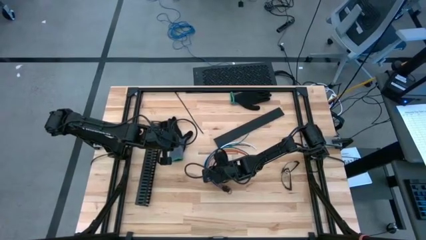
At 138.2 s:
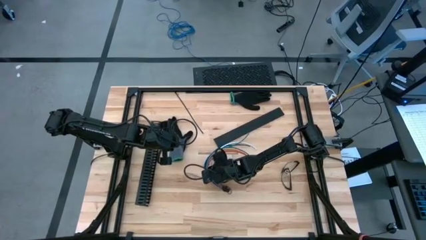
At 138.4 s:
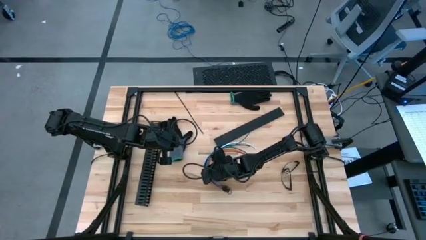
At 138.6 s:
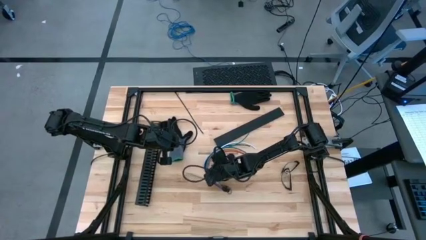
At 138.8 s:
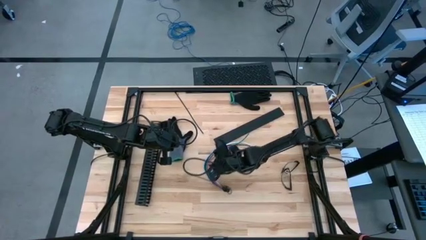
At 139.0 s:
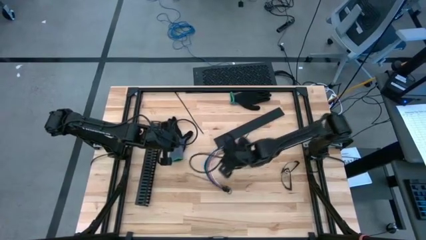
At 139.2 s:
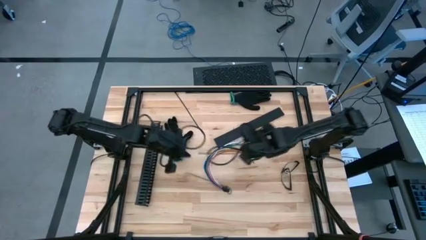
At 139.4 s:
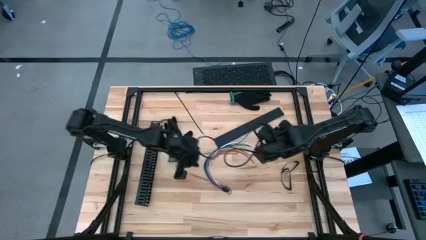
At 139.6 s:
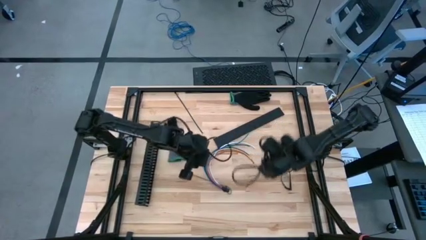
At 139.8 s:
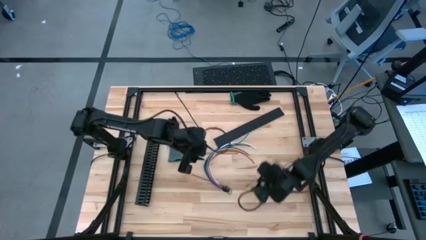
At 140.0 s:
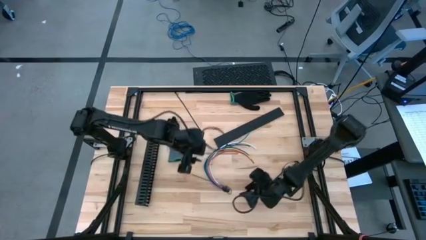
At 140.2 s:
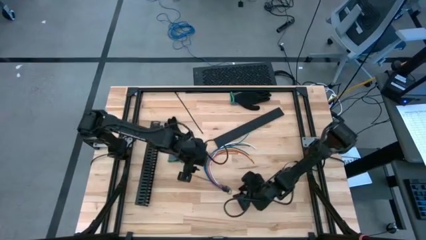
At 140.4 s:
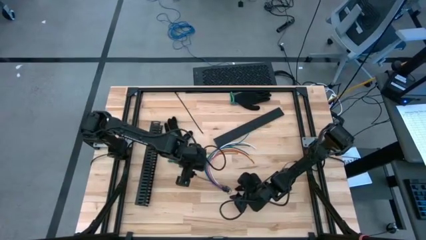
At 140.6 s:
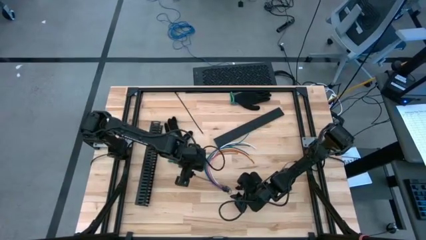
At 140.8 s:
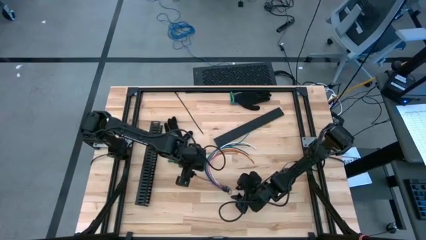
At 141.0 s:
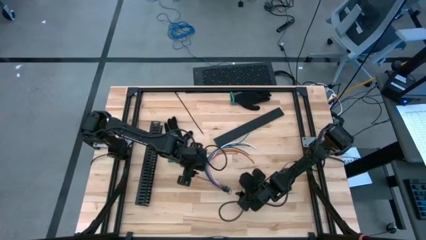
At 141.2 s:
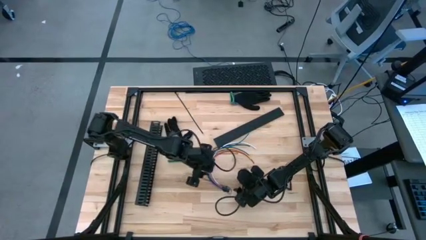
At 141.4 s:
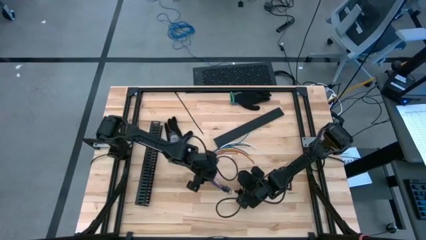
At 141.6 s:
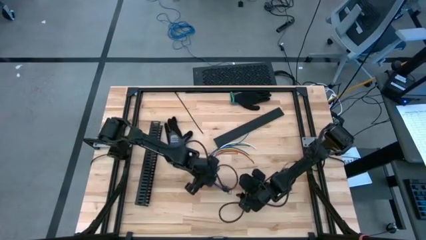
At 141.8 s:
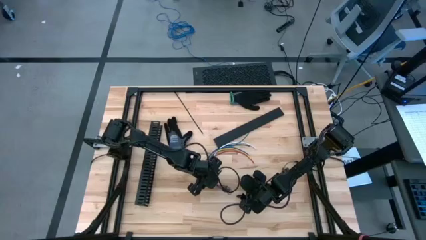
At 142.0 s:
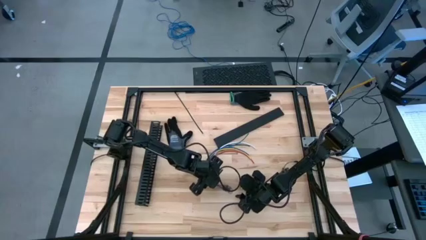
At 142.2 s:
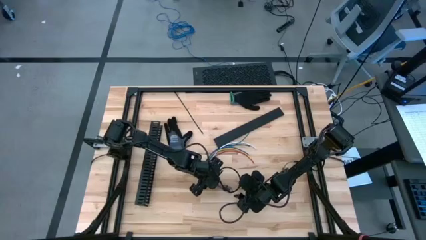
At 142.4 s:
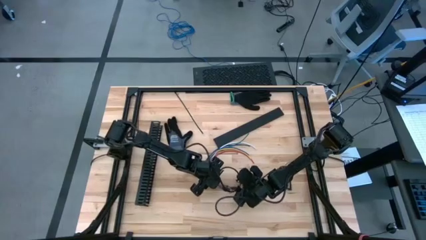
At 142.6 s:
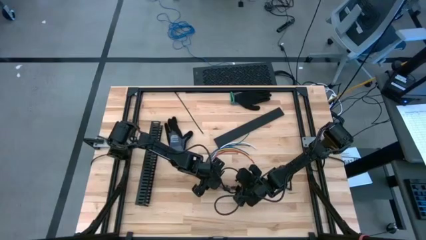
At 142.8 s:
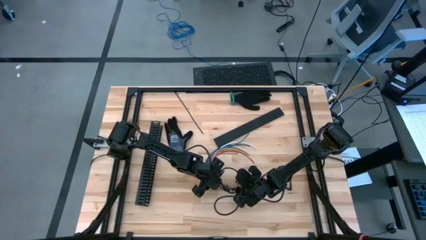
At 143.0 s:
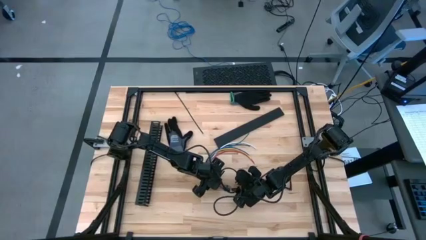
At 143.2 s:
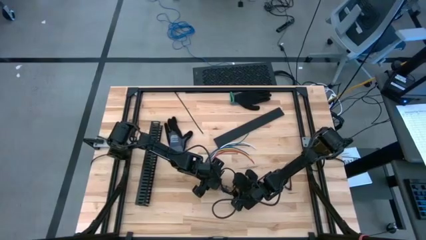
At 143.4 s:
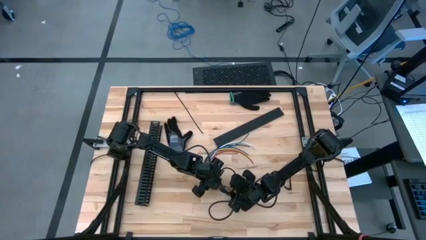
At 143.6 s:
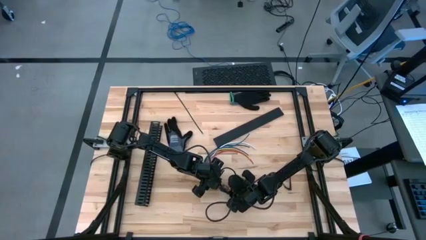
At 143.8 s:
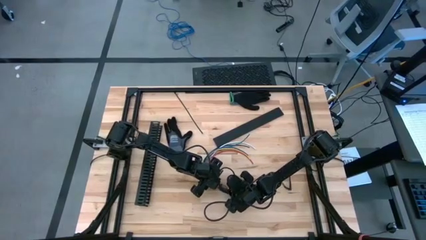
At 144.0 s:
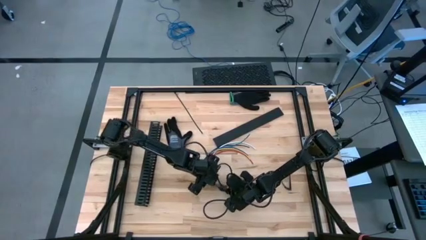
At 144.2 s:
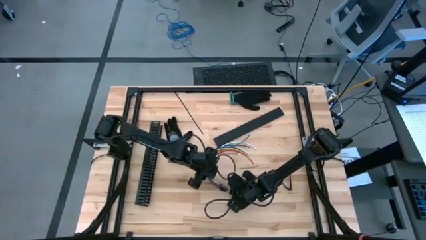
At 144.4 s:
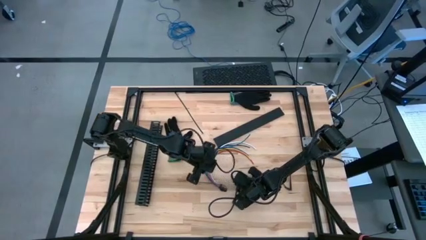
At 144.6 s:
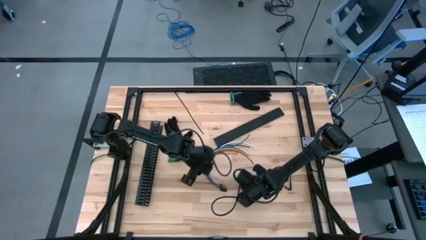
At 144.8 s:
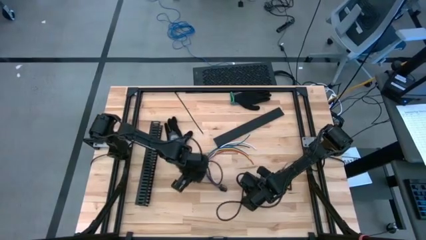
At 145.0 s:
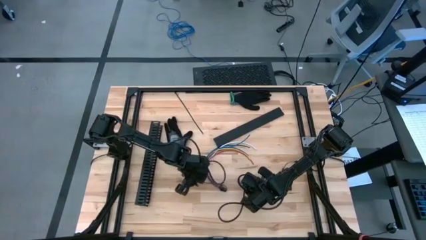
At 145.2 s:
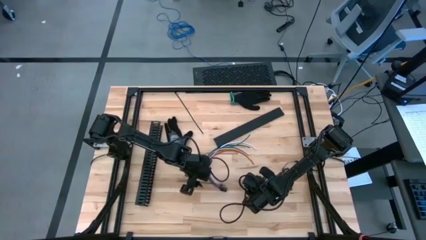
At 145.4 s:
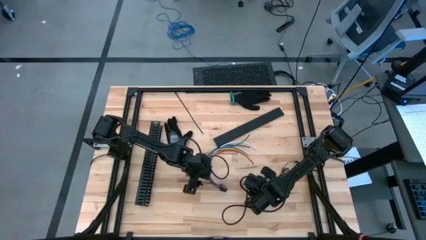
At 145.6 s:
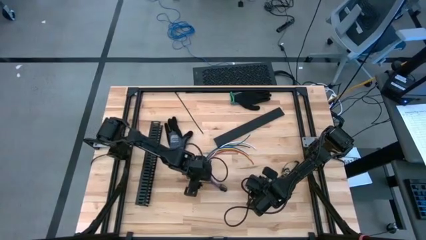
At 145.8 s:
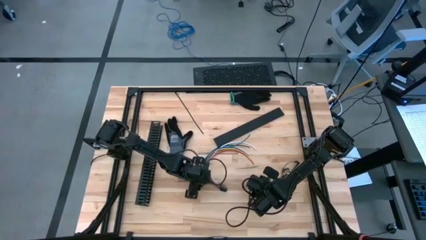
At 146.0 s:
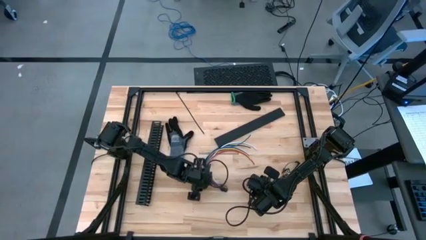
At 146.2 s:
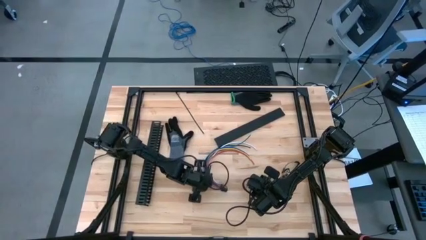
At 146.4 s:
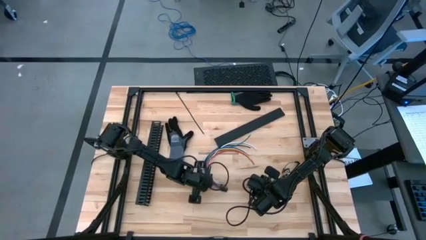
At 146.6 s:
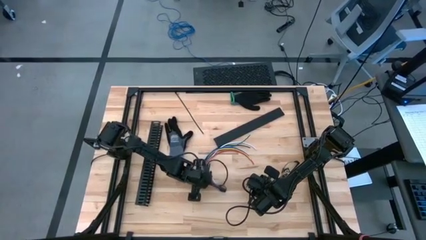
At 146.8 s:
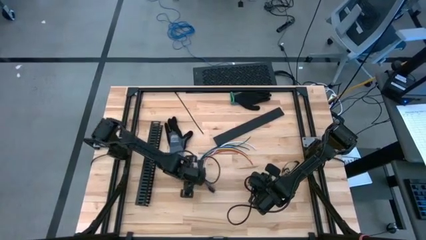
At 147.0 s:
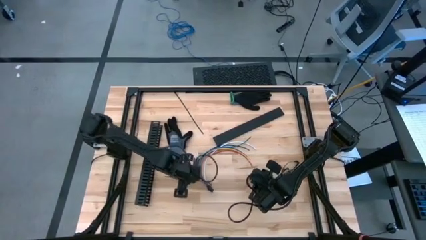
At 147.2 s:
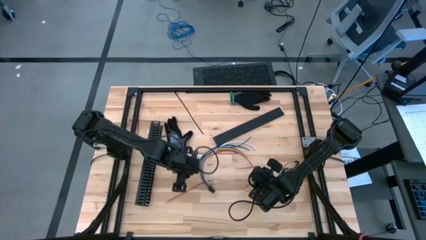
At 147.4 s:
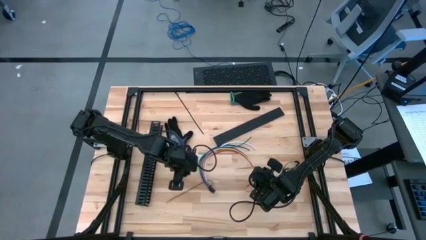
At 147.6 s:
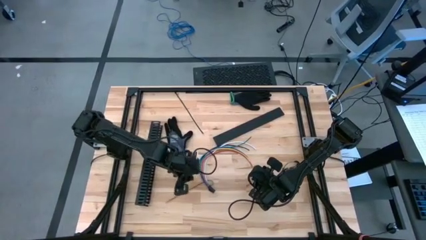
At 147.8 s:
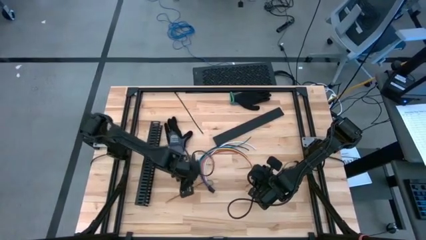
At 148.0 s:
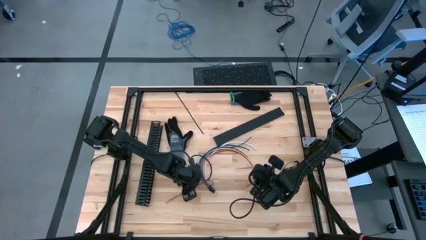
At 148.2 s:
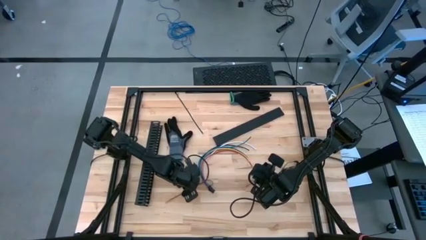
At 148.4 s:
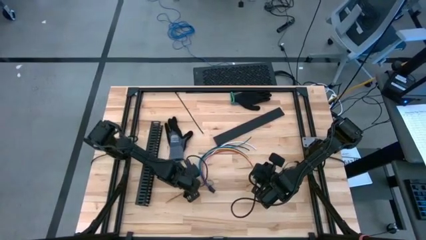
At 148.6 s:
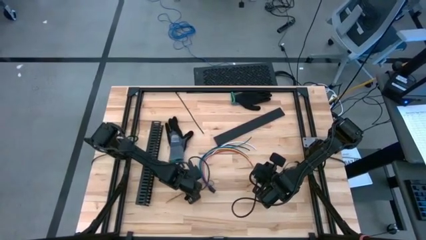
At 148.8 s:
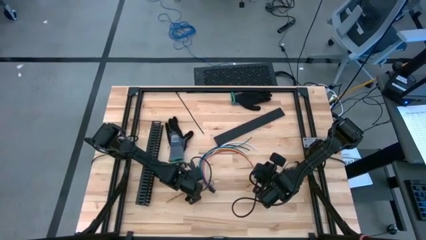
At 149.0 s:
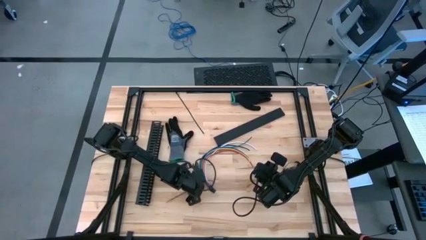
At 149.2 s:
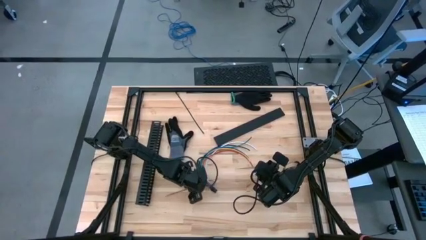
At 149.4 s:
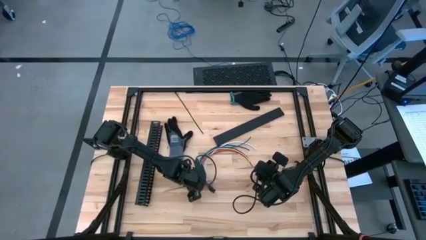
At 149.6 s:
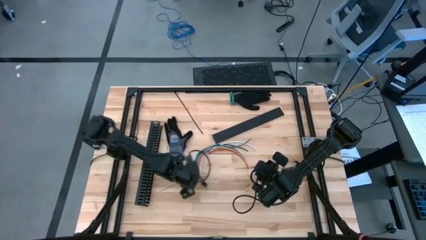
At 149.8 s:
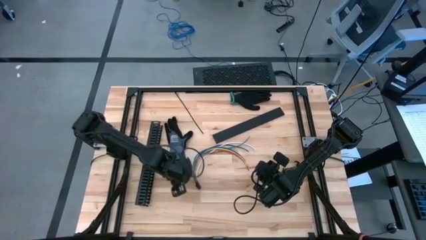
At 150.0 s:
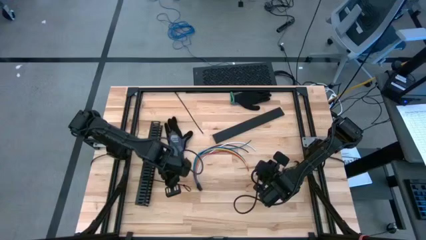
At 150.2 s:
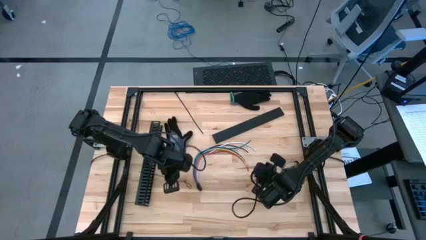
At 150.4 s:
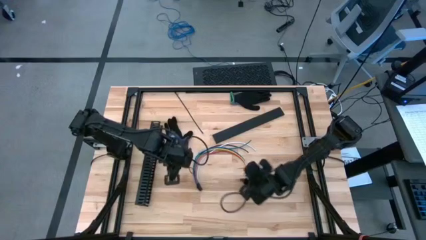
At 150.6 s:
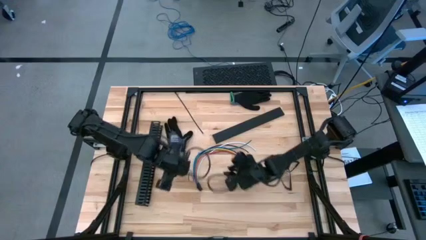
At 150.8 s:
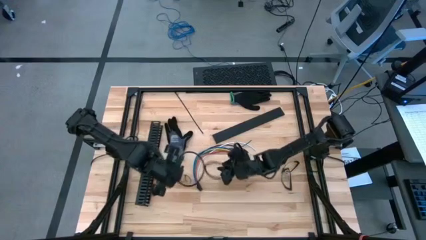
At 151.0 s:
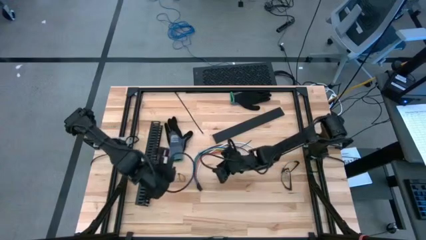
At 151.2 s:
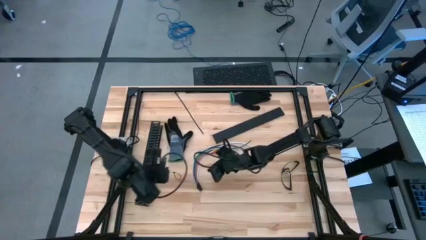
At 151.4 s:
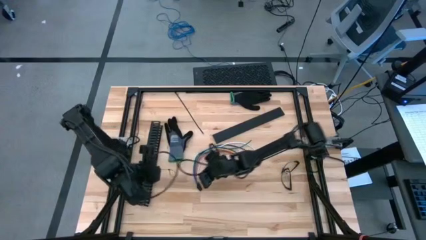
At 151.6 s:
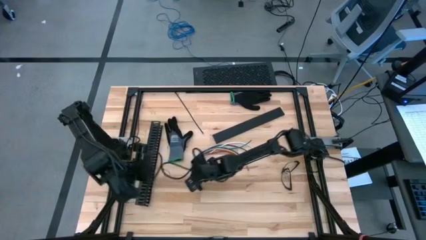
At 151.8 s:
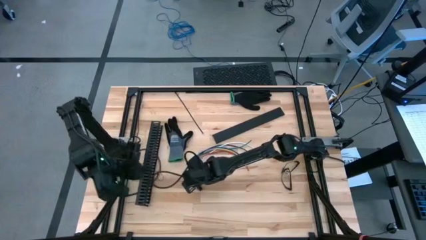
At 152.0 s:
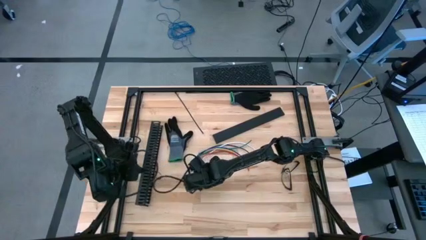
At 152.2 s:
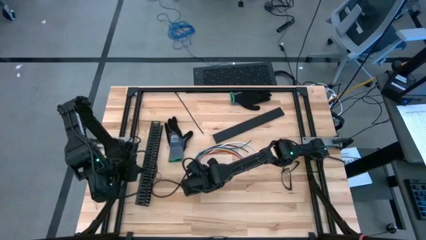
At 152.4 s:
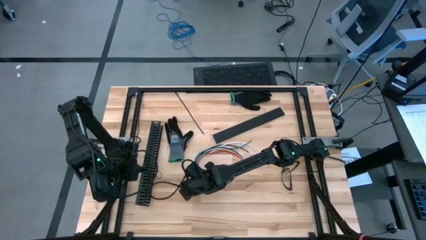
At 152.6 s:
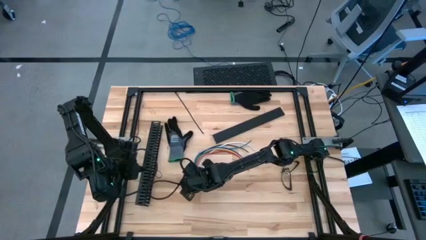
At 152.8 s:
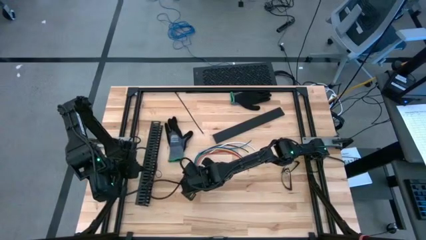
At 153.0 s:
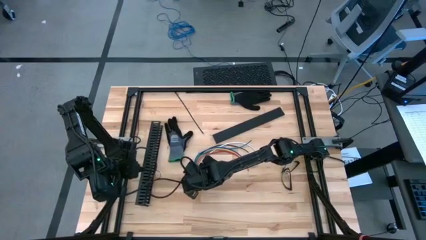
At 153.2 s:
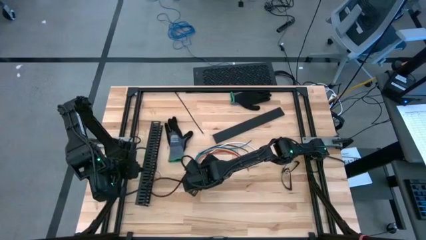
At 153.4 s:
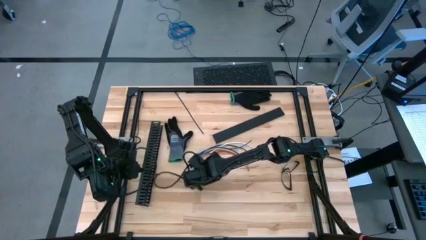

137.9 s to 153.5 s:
Task: Ziptie cables
Wrap the cable wires with the black zip tie
